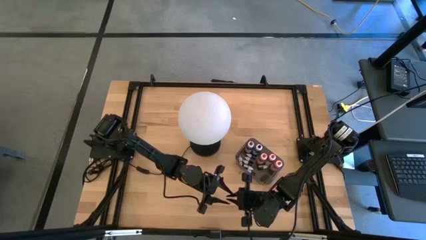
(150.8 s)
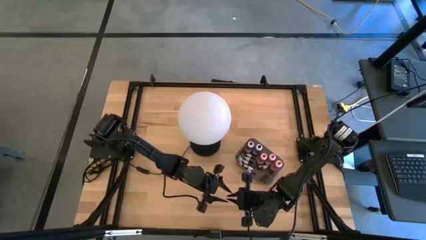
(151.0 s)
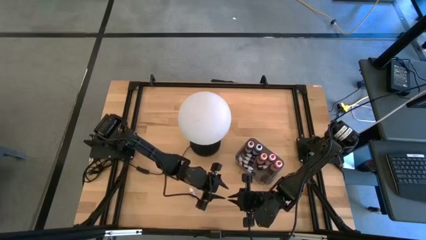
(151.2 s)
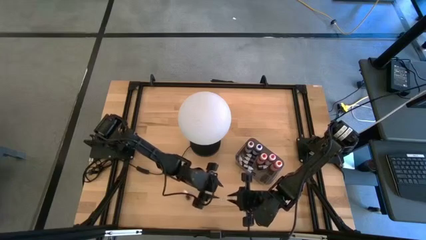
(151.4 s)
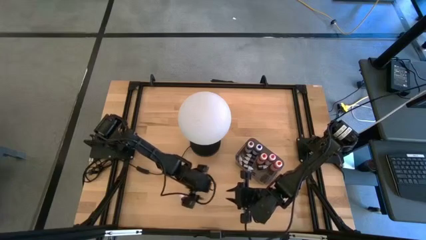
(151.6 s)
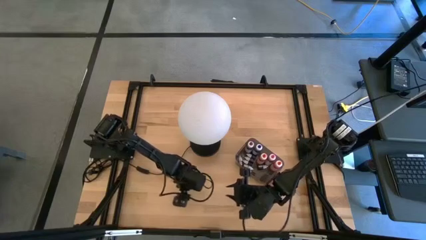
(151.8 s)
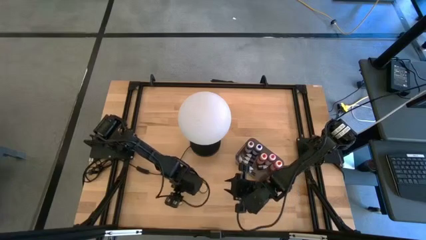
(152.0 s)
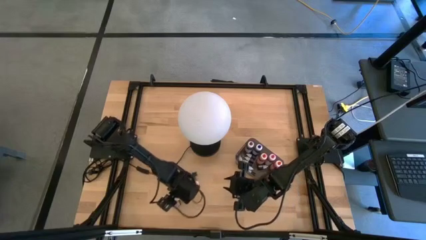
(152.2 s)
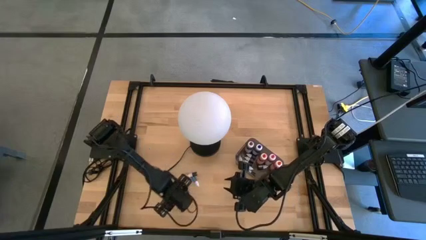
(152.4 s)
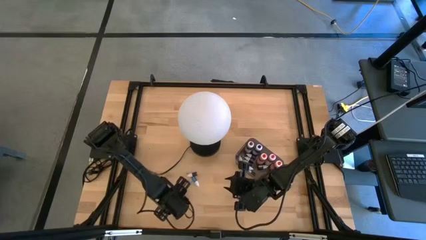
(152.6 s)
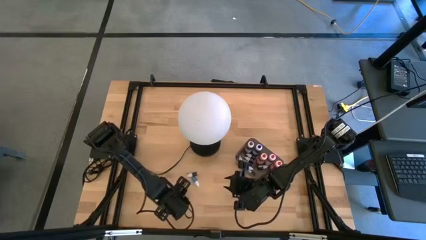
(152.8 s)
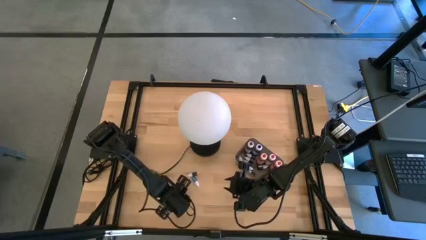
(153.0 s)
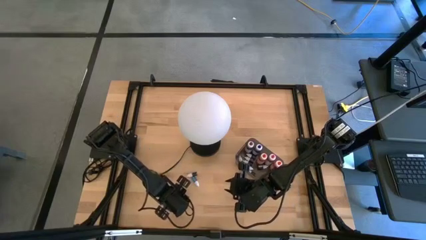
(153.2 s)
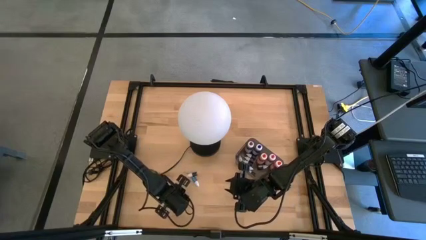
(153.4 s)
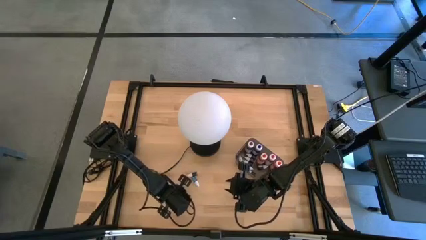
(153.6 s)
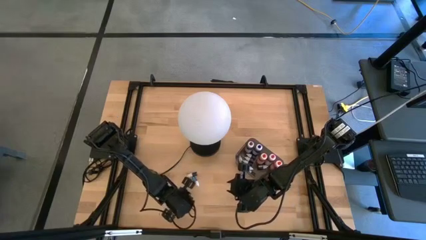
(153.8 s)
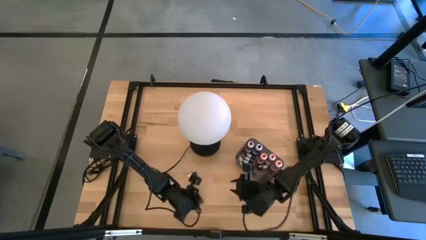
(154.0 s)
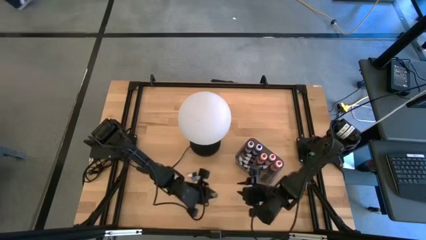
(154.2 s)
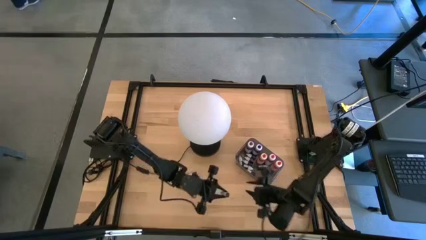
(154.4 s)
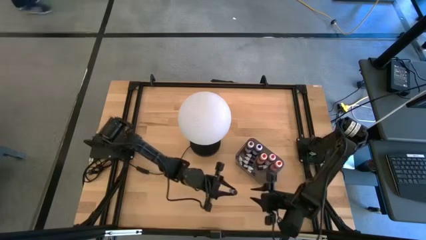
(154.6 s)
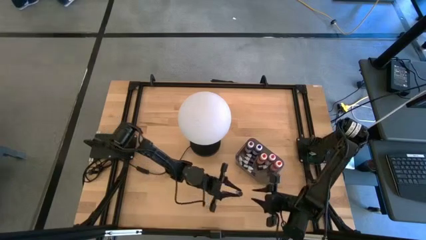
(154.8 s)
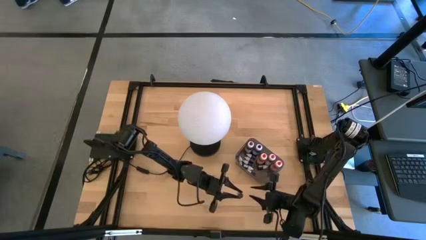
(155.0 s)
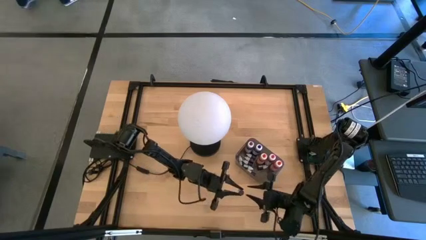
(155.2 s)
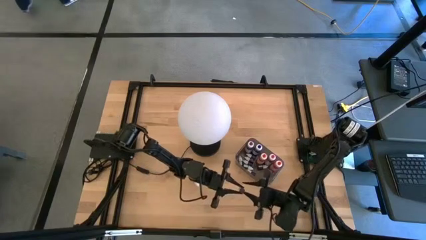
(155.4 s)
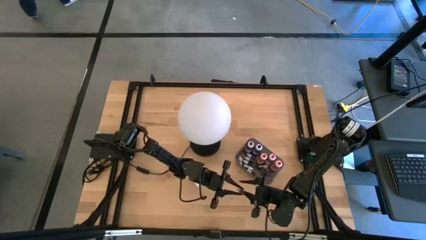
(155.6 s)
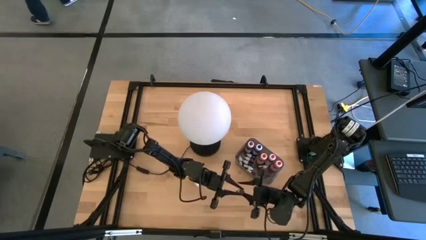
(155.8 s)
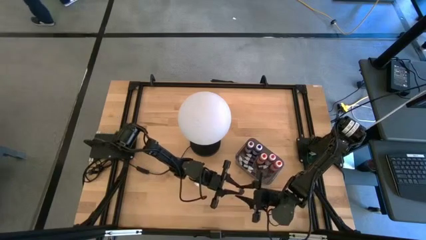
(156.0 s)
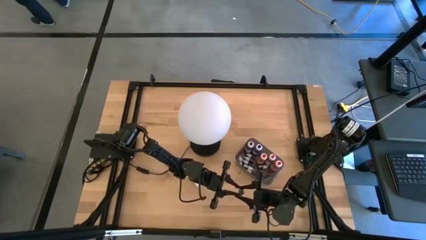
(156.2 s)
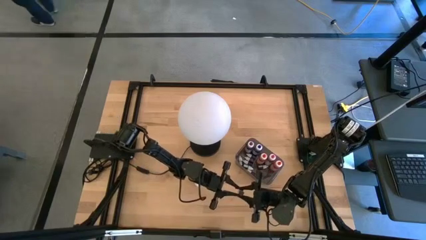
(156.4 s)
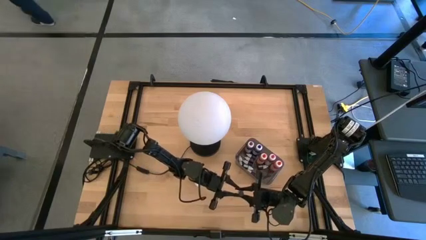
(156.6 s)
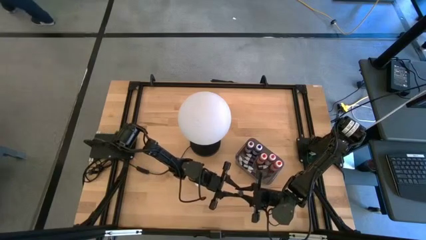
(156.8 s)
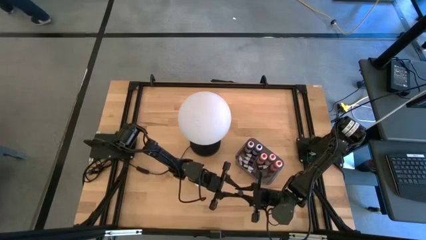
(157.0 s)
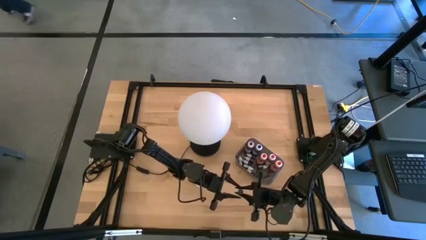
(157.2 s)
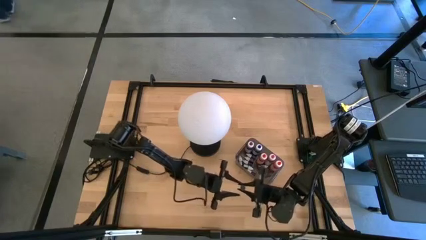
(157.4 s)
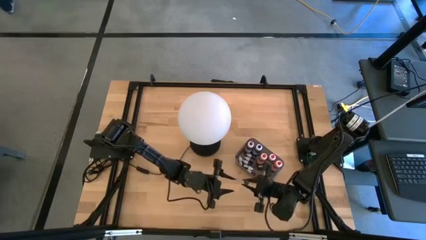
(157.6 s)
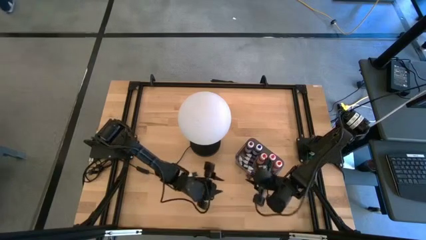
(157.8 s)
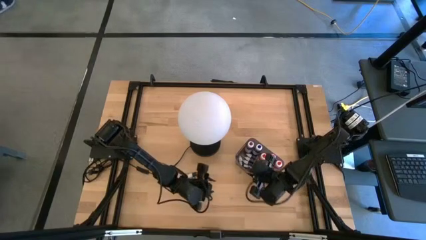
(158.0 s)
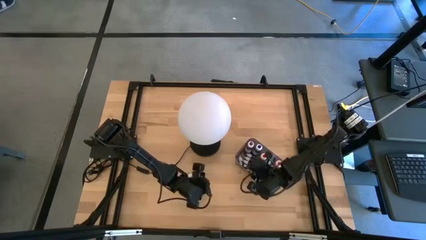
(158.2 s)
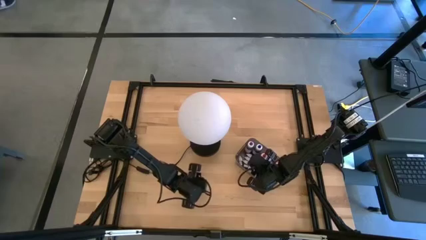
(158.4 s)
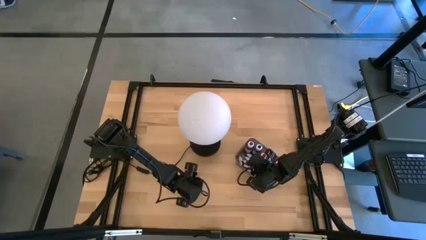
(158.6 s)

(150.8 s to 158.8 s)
Task: Pick & Place food coloring
Put the small pink food coloring bottle into the black container

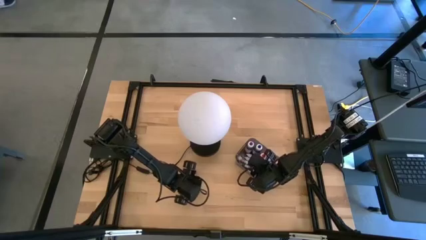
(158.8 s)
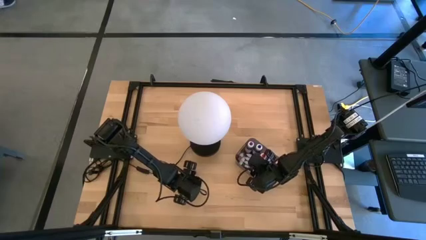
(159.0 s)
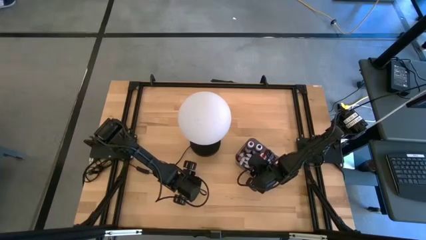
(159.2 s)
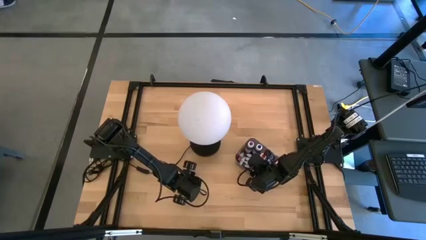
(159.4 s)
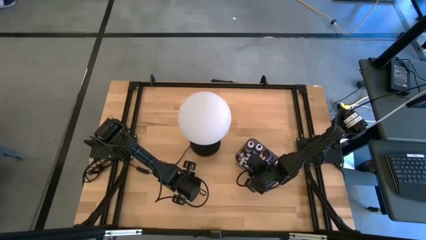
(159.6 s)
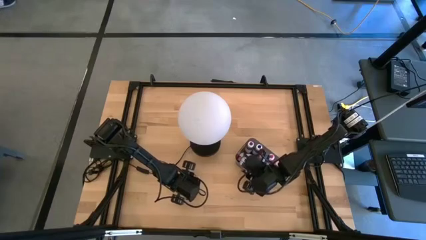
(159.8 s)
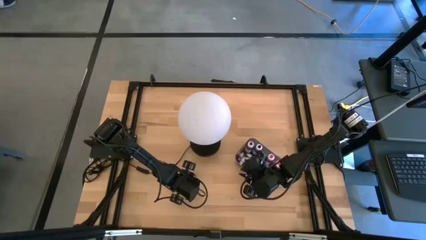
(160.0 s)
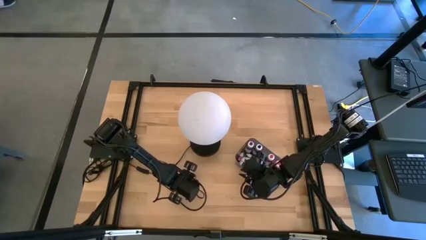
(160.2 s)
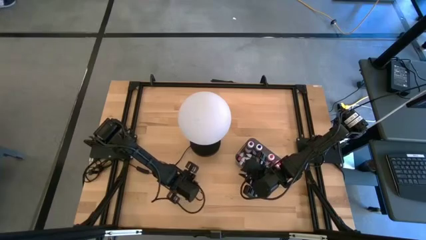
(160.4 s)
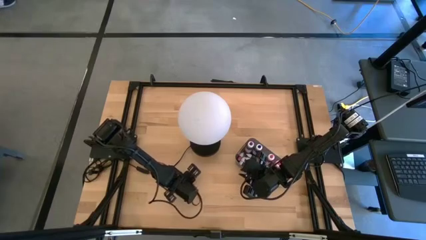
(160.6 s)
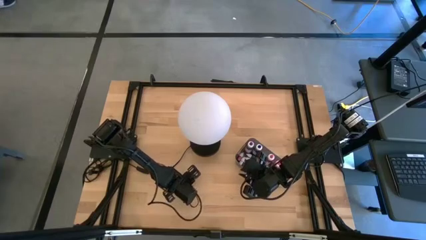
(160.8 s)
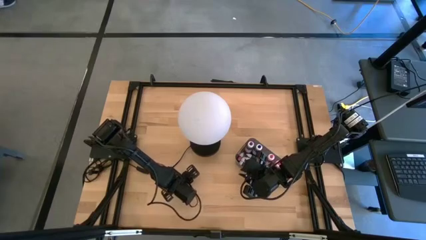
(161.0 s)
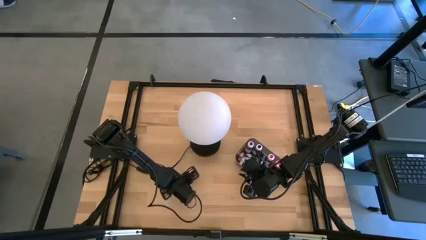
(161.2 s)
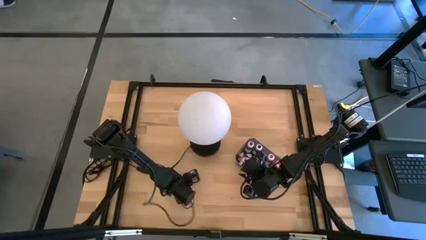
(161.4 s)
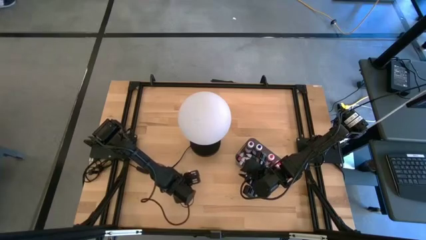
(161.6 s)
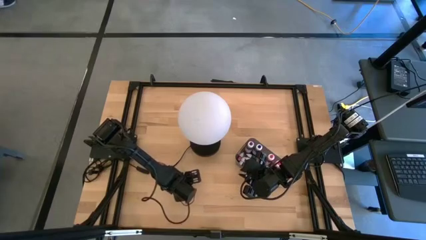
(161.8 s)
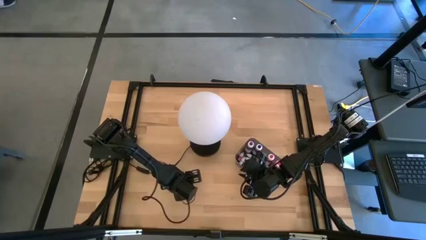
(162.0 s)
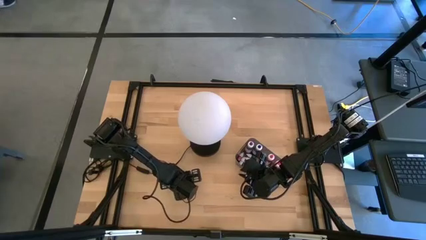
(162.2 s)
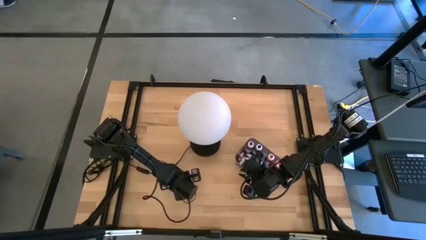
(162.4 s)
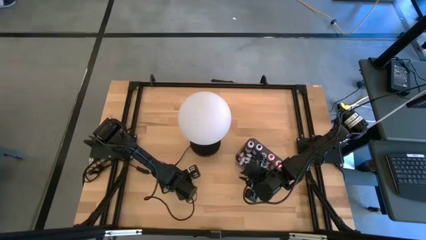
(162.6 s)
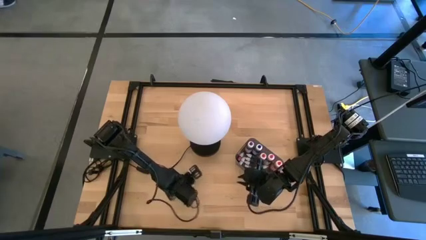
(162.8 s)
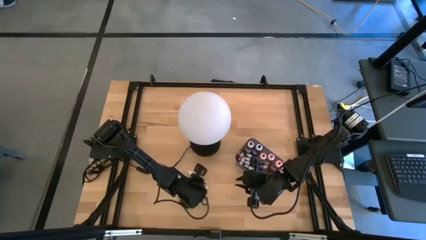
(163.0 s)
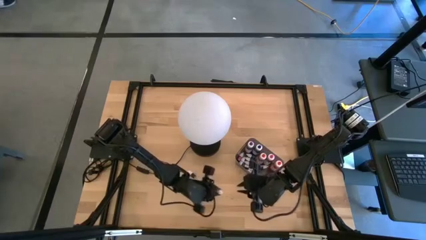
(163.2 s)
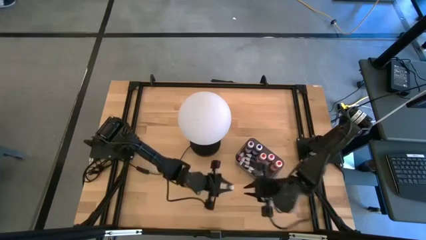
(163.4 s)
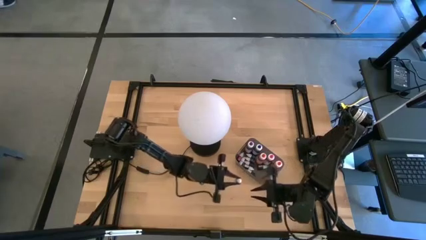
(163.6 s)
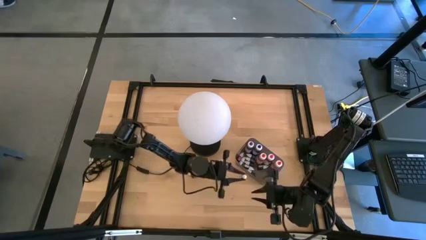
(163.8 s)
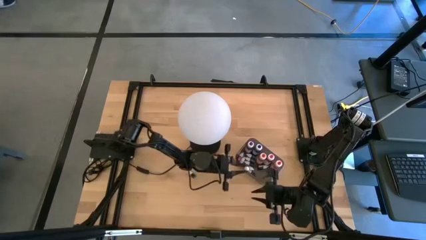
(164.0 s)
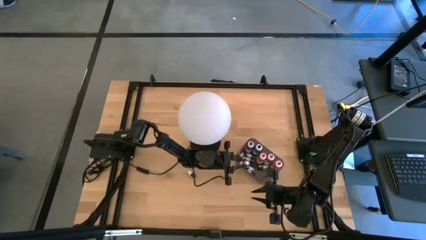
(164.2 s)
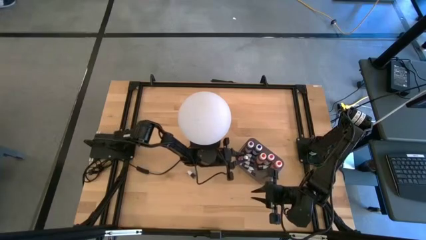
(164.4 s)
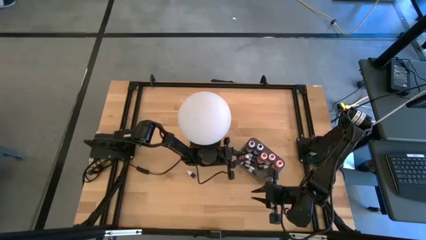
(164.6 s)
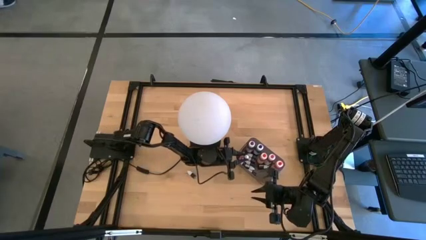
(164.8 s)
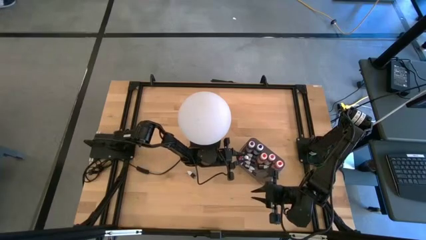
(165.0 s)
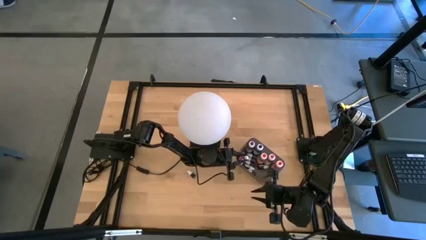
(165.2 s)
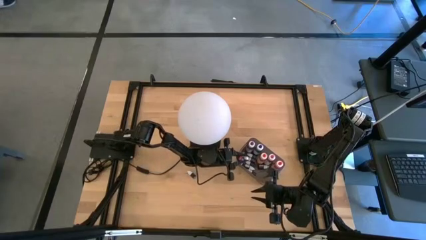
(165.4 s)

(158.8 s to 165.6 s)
Put the small blue food coloring bottle into the black container

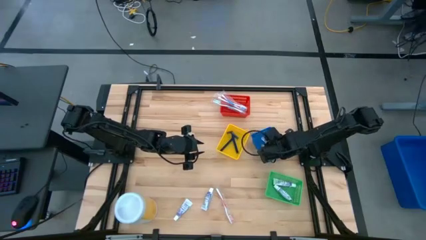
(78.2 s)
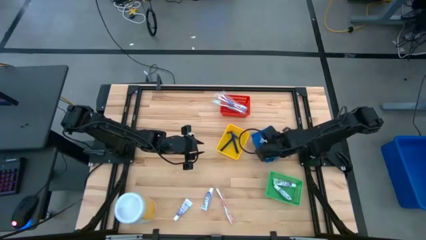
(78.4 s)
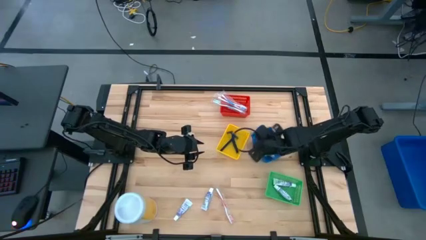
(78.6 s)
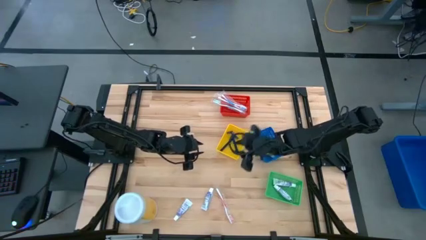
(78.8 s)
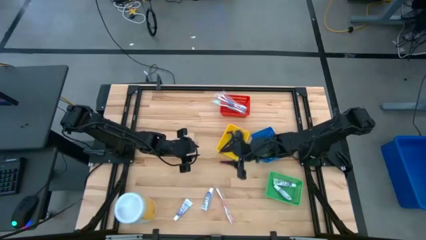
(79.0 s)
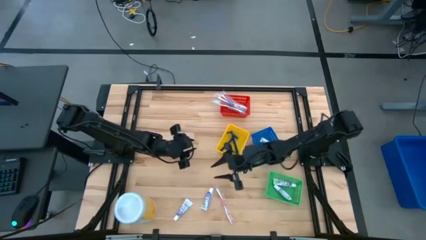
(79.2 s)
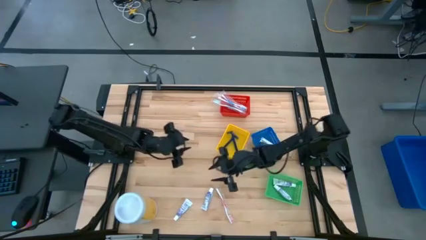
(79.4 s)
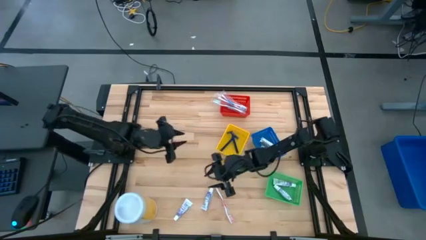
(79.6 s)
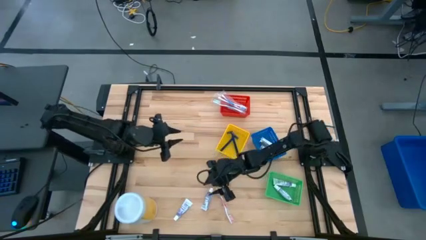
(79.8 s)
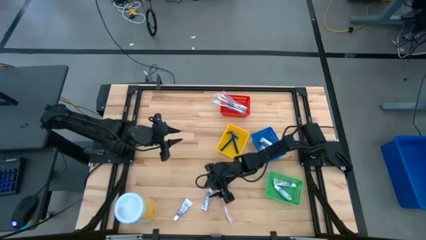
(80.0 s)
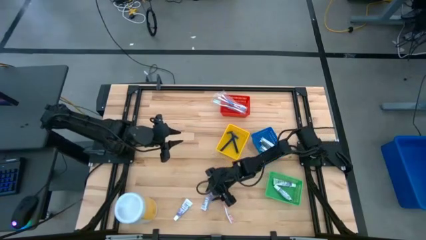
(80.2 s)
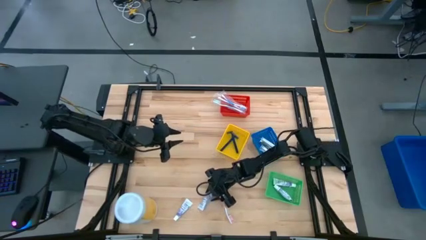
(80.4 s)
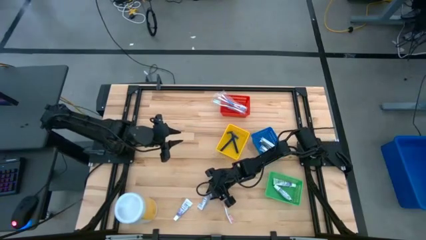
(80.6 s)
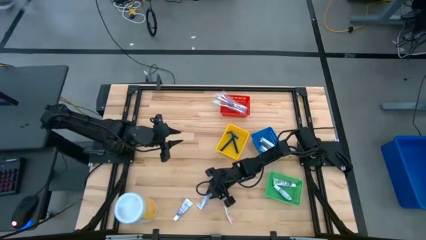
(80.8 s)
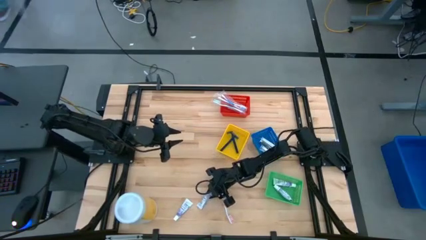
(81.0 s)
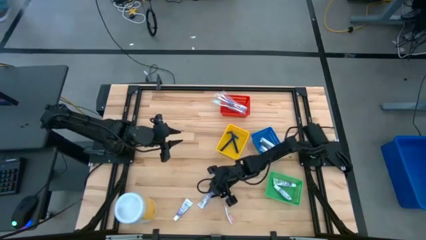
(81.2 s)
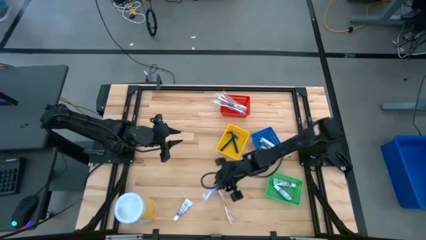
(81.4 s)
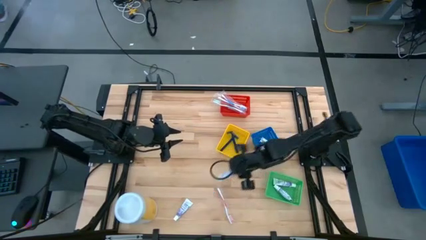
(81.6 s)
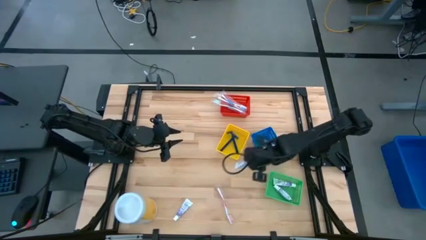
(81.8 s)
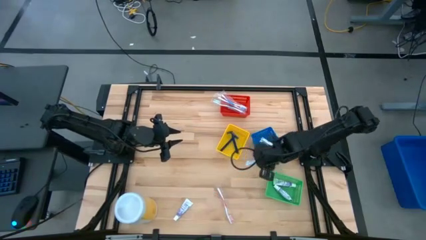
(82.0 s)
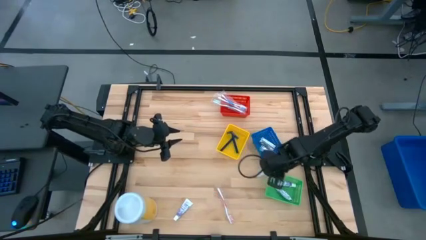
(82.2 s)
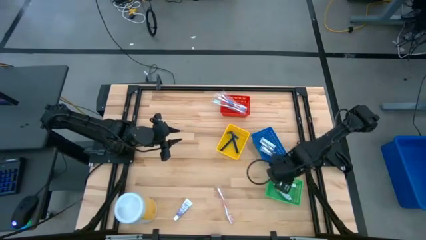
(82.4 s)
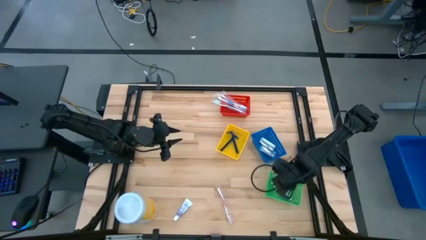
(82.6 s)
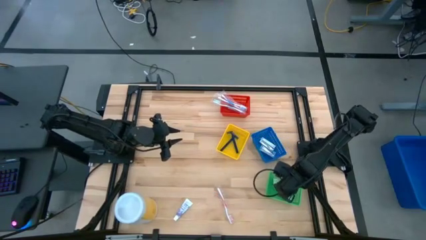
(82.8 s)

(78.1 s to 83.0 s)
Task: Pick & Place Travel size toiletries
Put the toothpaste into the green bin
